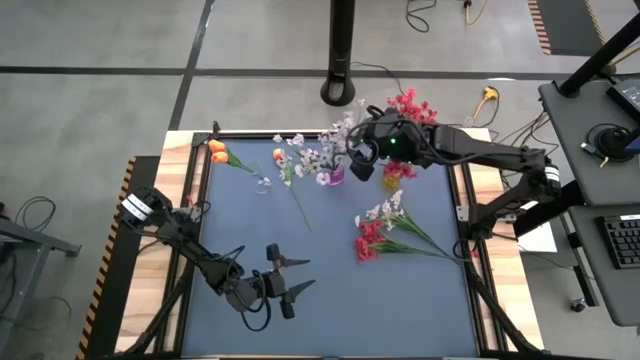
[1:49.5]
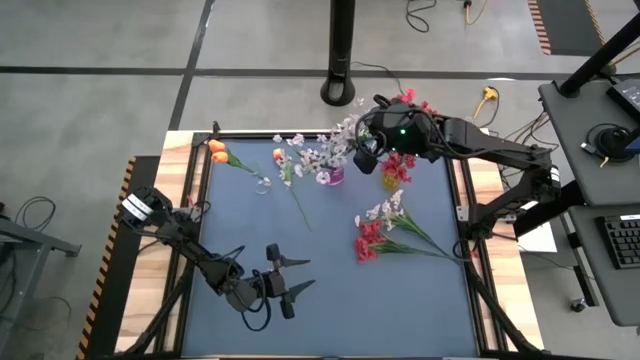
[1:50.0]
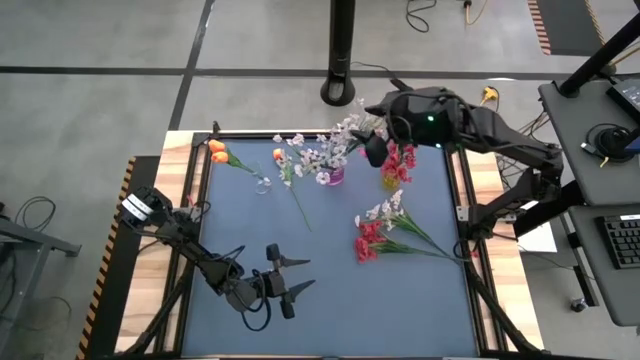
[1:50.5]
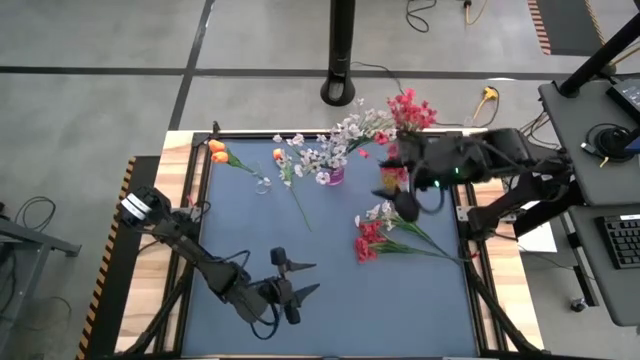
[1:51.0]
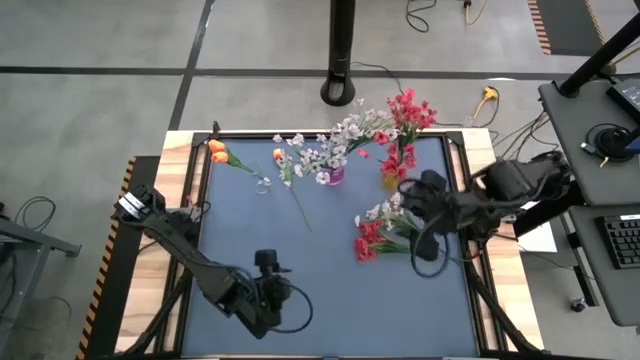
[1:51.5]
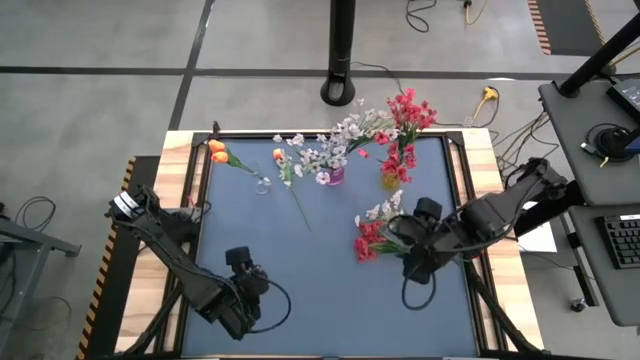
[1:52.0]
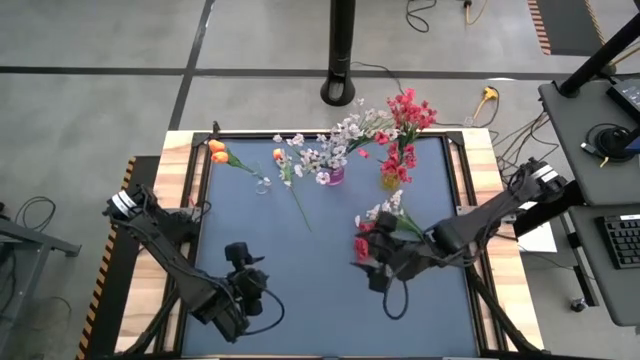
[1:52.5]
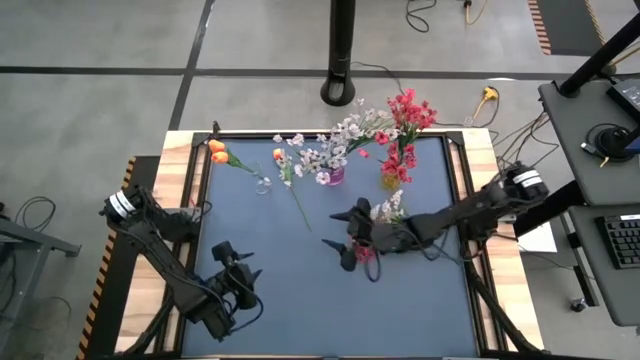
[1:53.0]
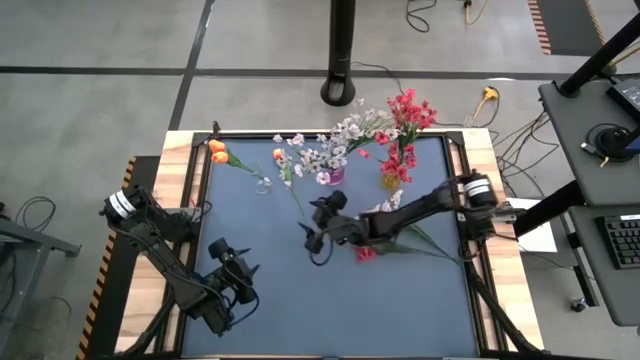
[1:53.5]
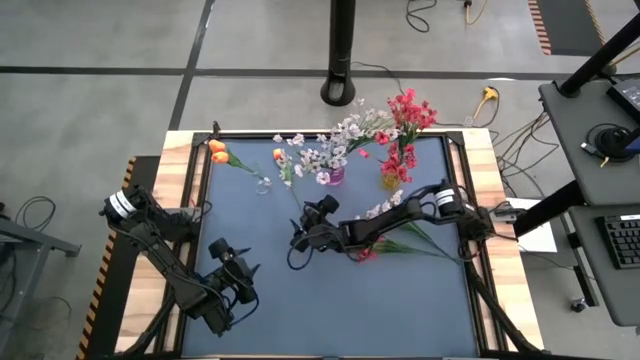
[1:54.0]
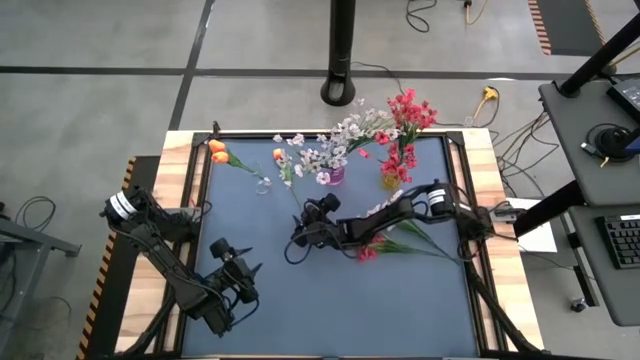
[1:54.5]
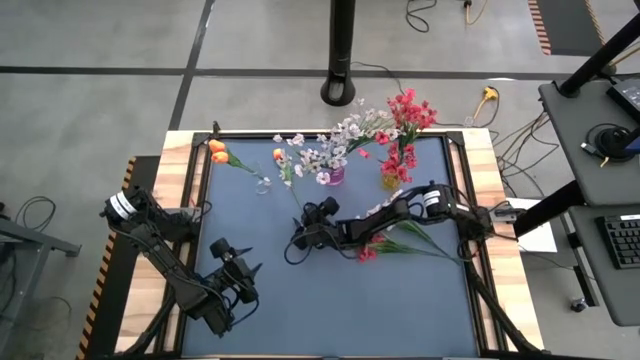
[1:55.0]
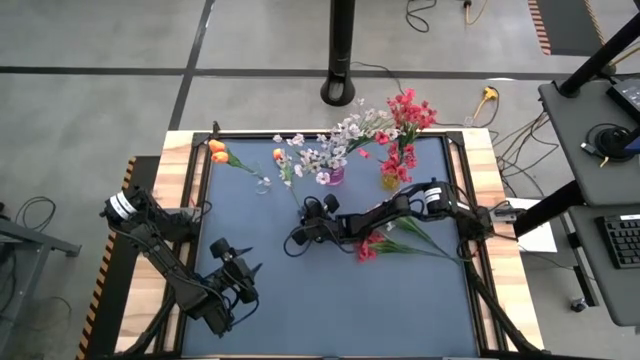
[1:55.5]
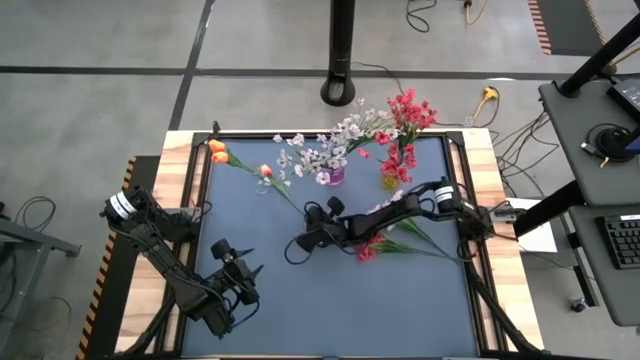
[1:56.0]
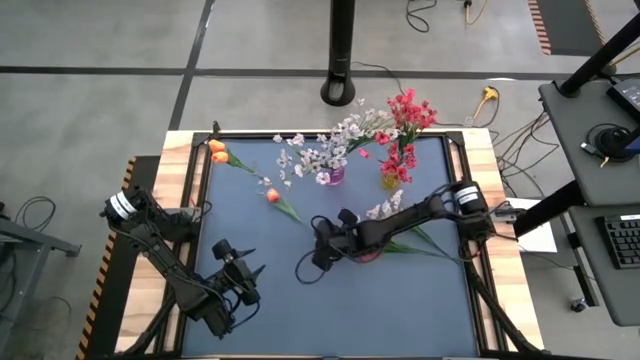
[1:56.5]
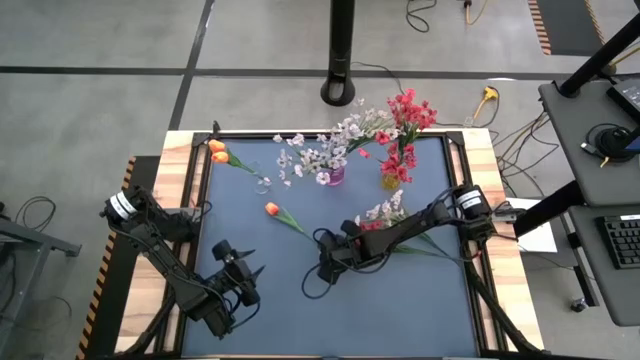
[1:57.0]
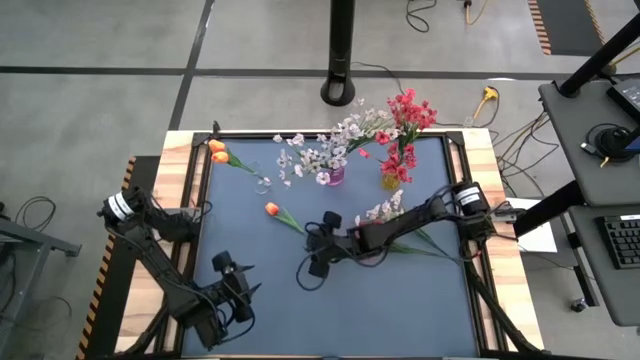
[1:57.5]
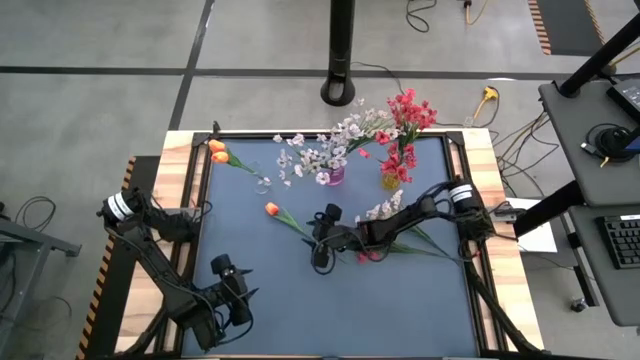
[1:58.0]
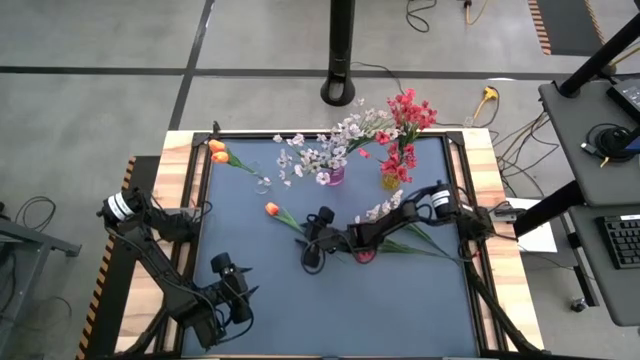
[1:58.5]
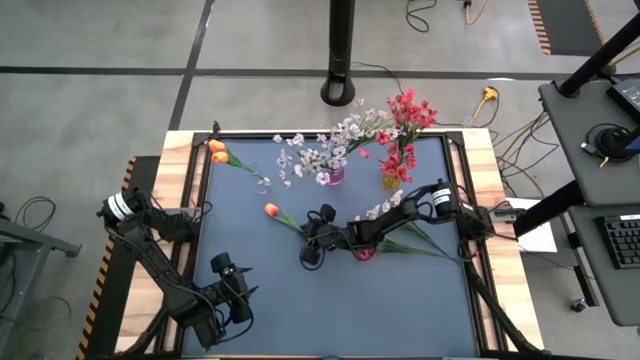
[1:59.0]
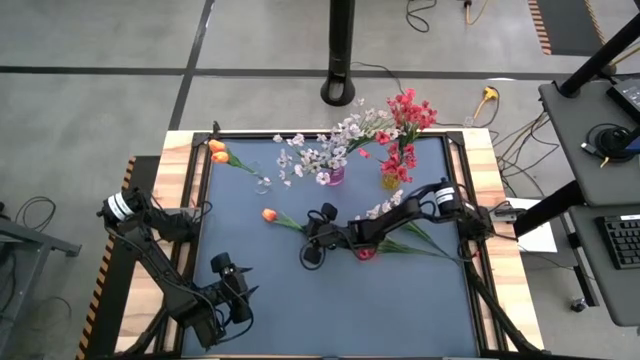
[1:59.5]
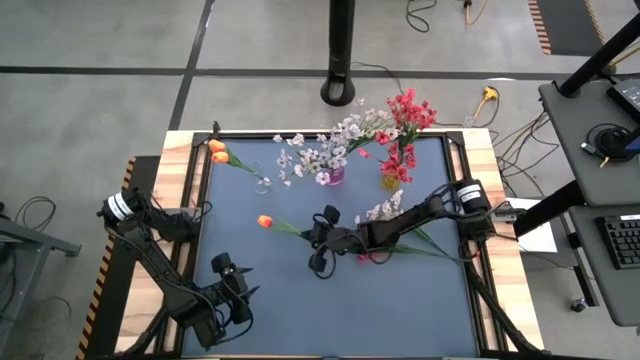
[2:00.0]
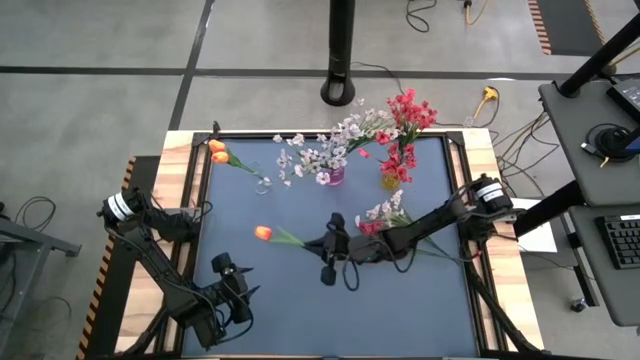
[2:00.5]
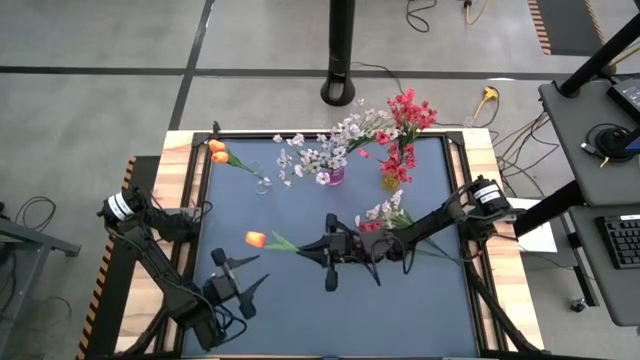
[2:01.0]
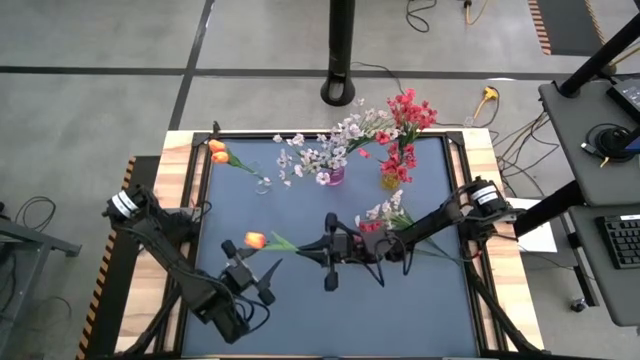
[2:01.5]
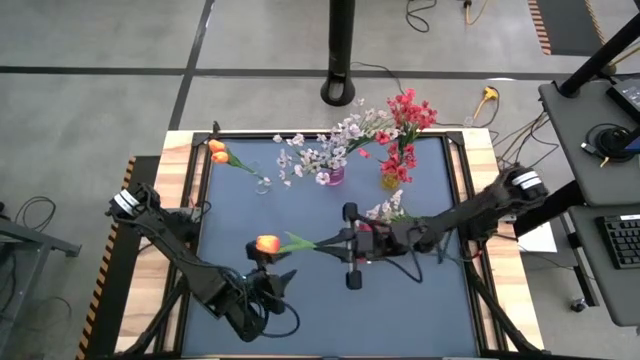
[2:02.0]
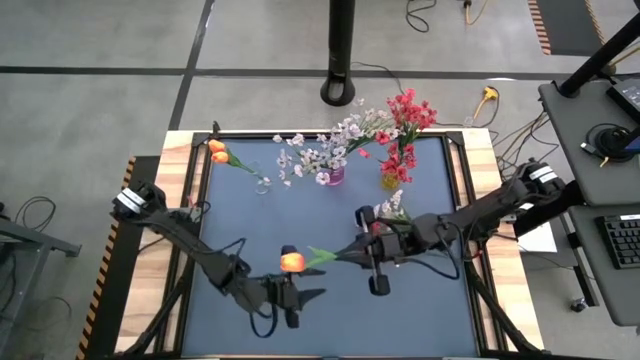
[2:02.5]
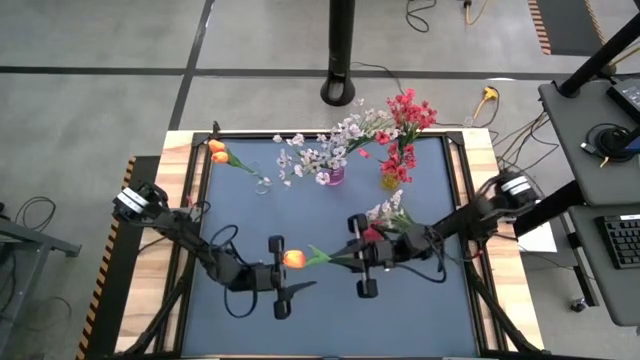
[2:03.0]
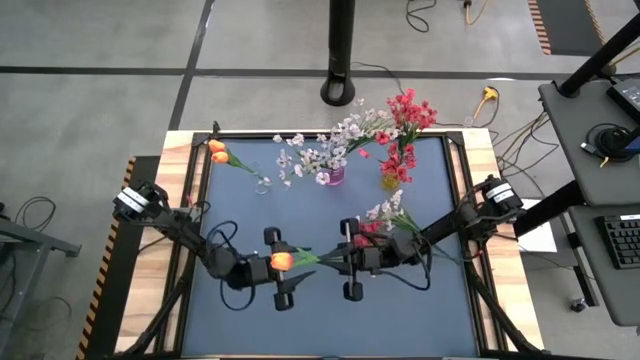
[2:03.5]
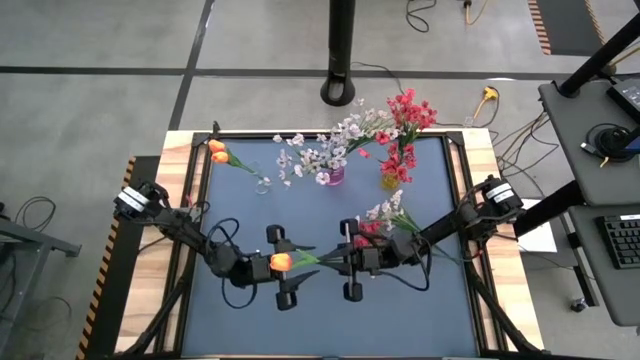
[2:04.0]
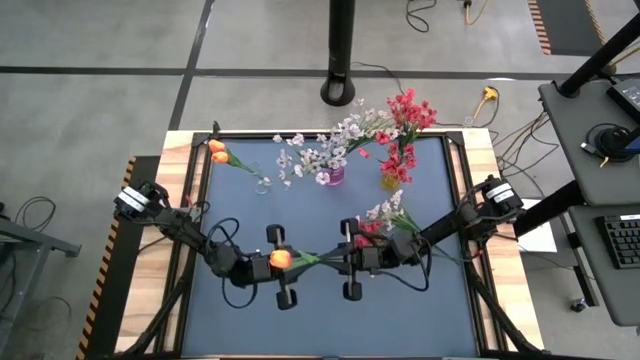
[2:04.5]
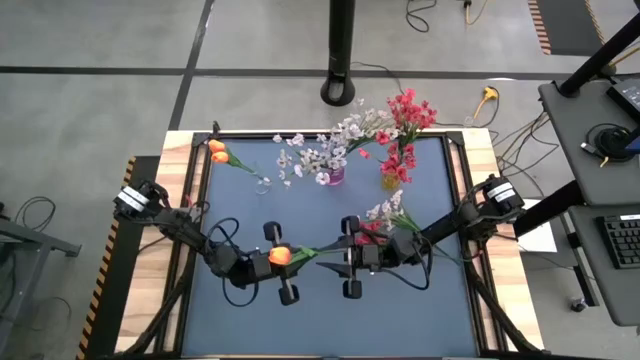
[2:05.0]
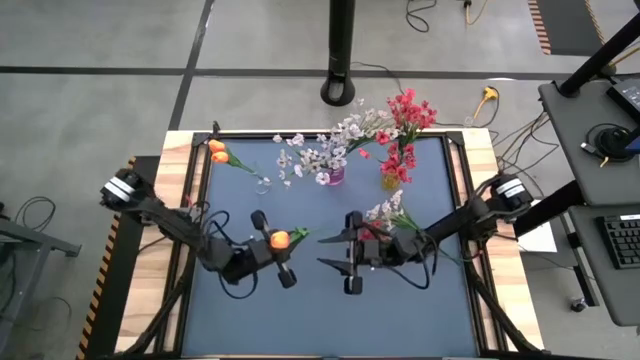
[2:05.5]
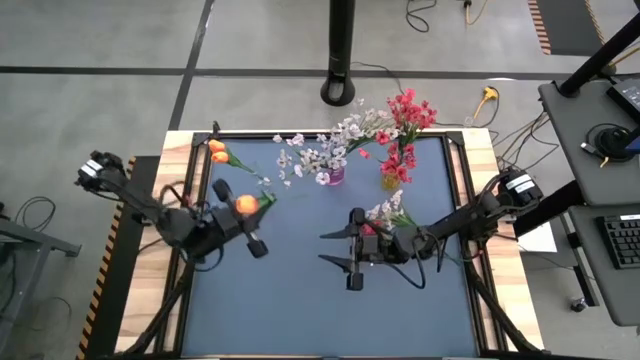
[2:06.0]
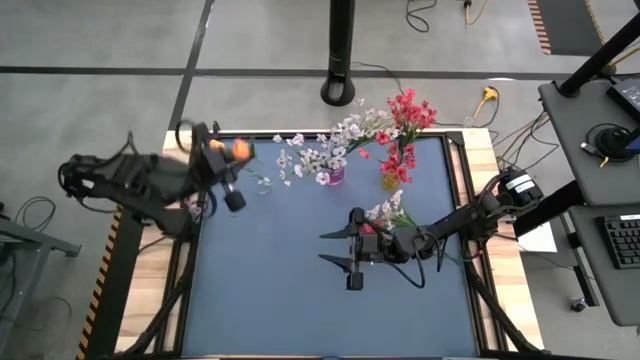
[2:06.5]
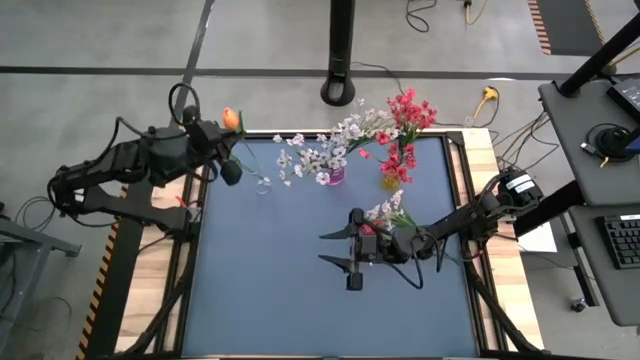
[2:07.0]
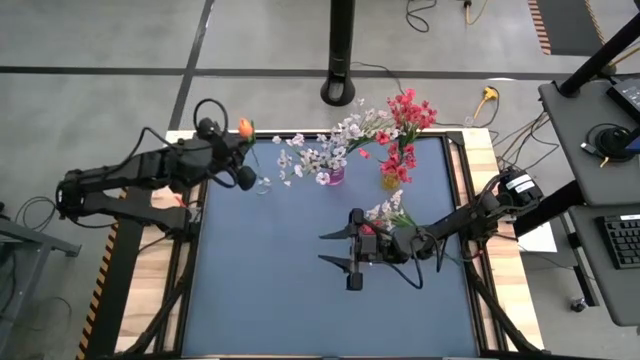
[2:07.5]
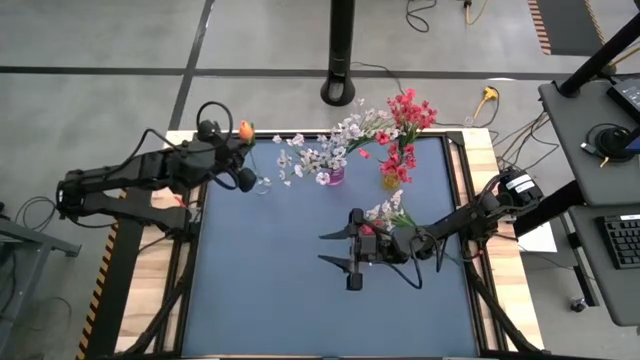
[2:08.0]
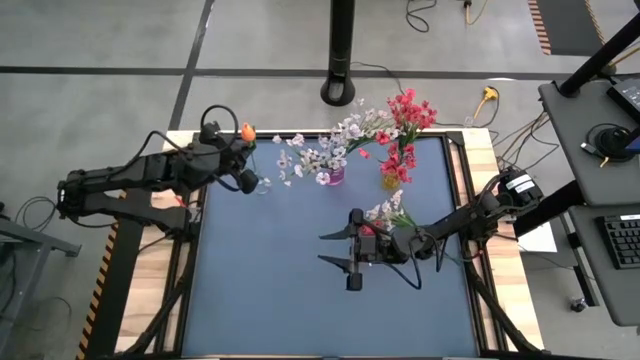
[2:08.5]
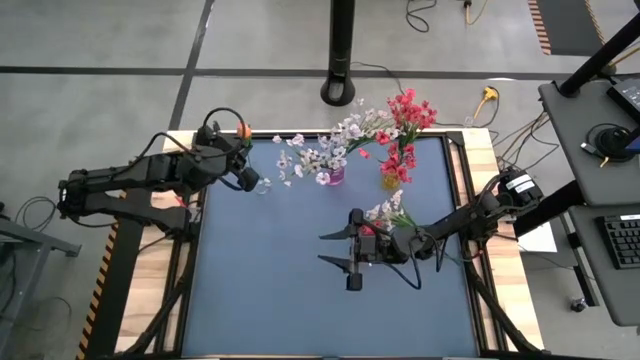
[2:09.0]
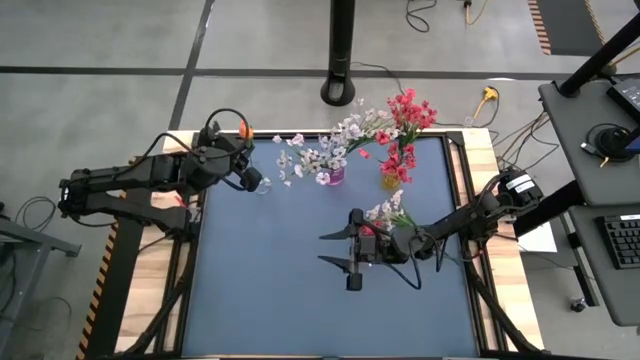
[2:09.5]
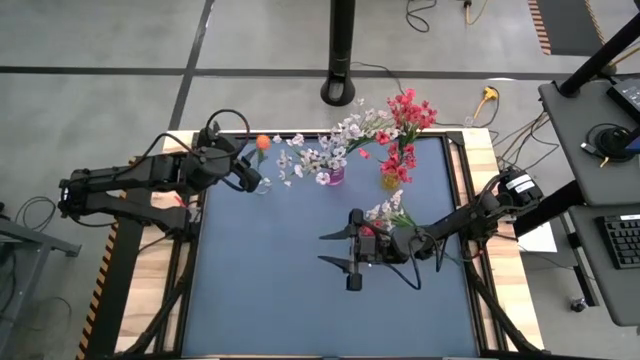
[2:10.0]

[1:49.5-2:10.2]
Task: Sort flowers into vase by color
Put the orange tulip into the transparent vase
